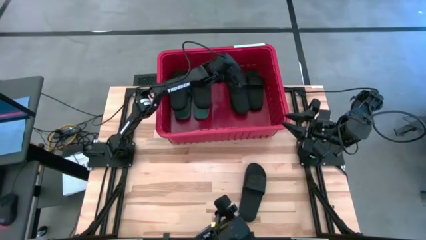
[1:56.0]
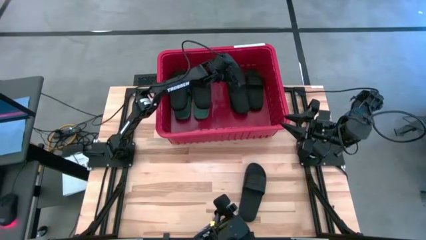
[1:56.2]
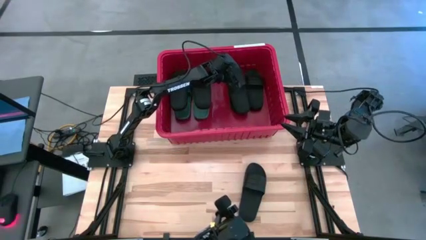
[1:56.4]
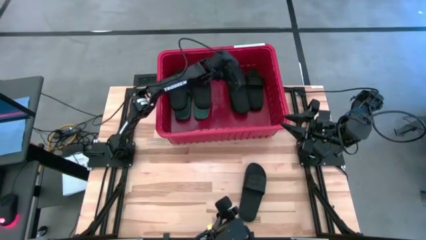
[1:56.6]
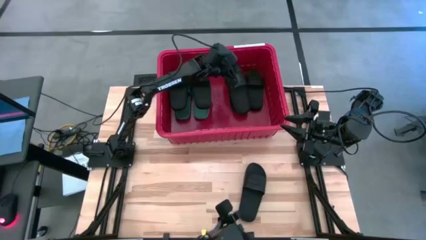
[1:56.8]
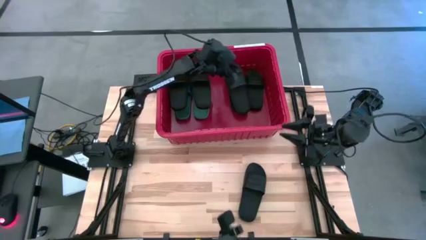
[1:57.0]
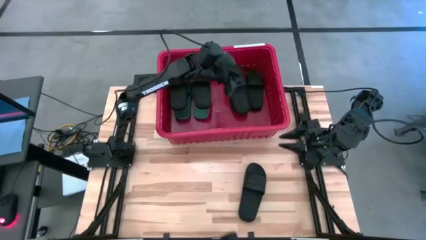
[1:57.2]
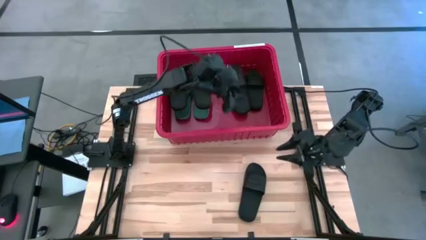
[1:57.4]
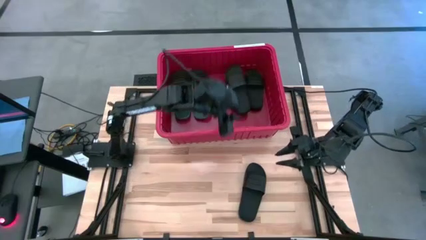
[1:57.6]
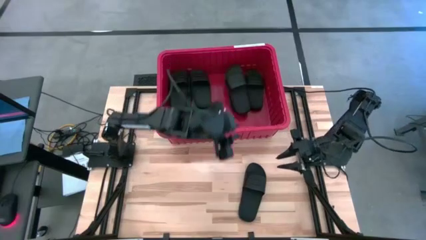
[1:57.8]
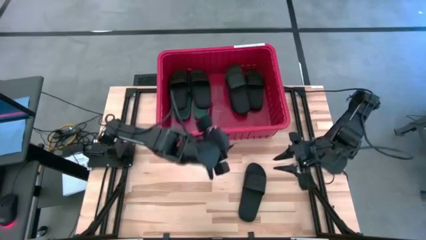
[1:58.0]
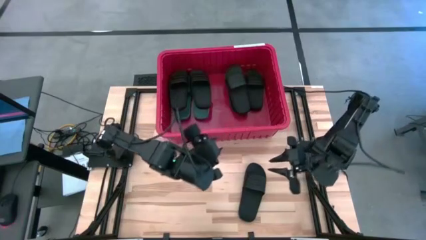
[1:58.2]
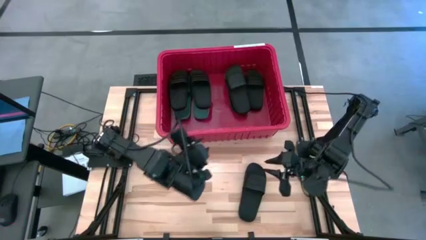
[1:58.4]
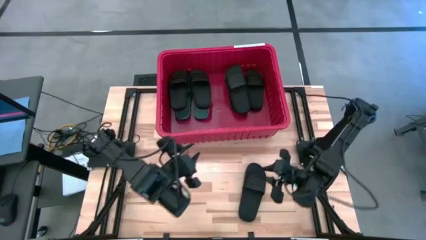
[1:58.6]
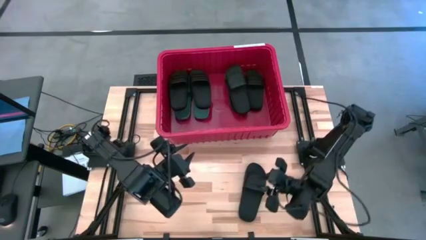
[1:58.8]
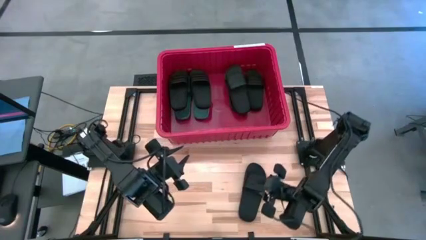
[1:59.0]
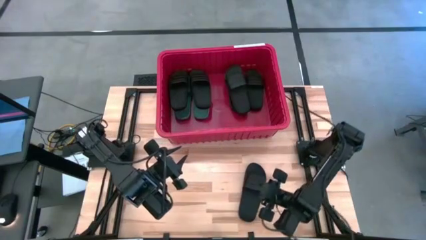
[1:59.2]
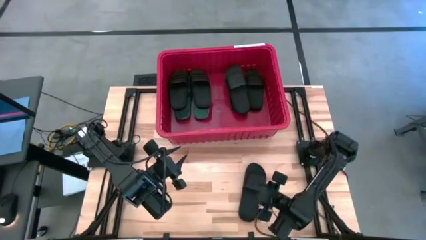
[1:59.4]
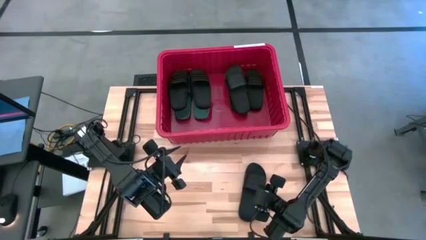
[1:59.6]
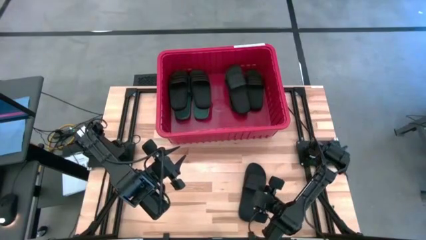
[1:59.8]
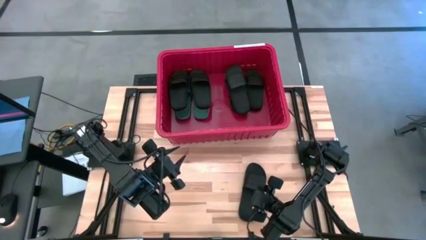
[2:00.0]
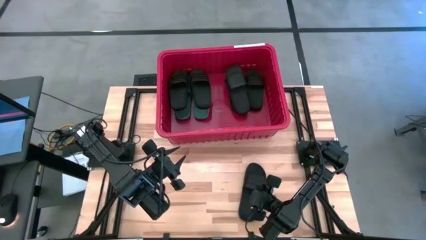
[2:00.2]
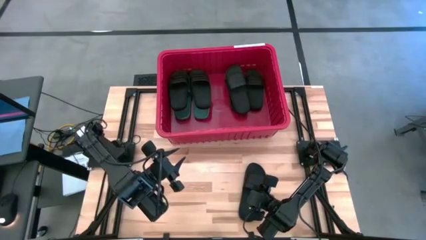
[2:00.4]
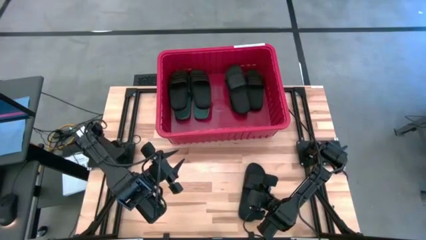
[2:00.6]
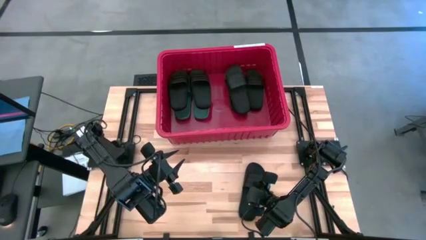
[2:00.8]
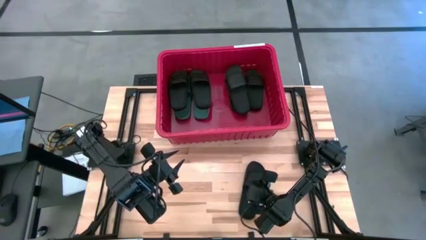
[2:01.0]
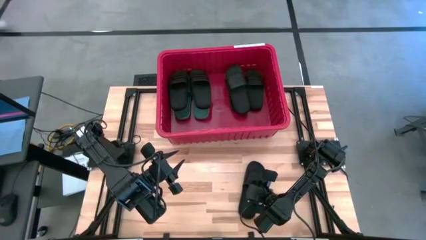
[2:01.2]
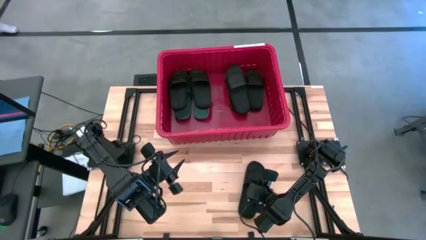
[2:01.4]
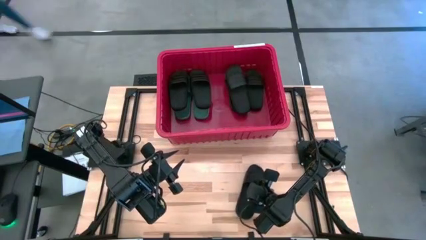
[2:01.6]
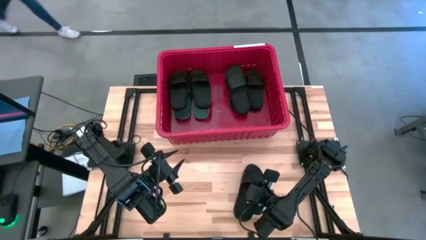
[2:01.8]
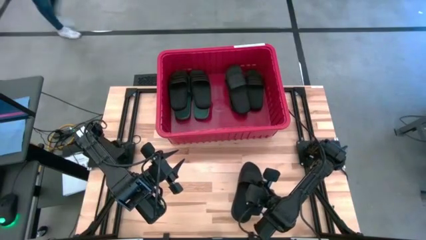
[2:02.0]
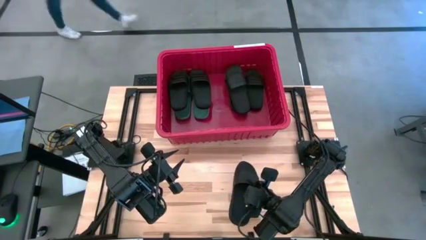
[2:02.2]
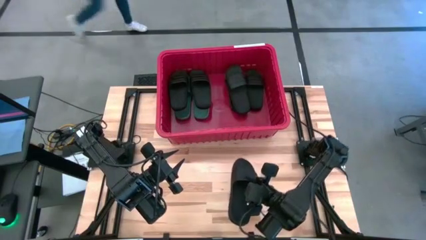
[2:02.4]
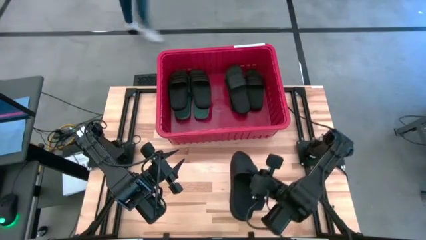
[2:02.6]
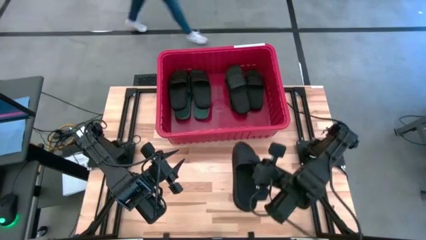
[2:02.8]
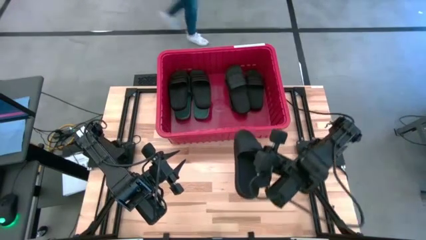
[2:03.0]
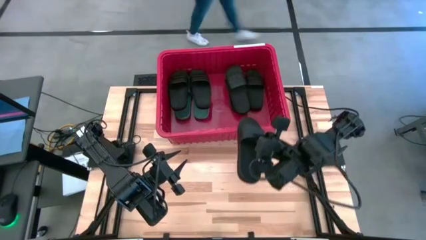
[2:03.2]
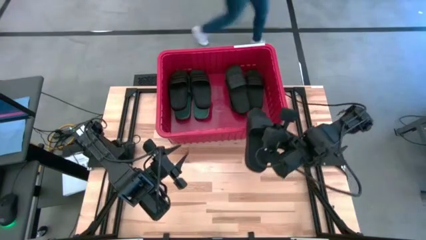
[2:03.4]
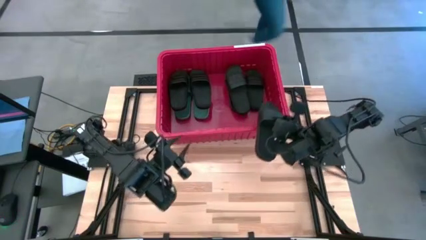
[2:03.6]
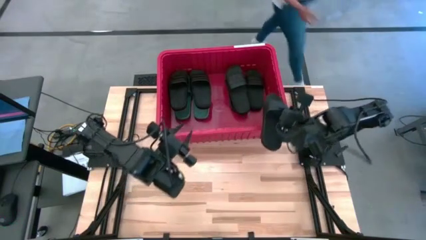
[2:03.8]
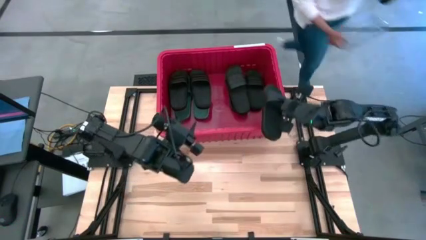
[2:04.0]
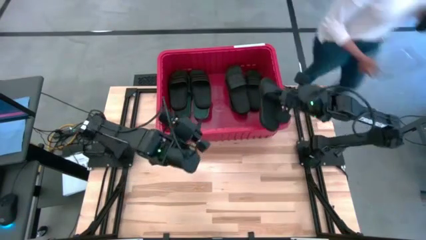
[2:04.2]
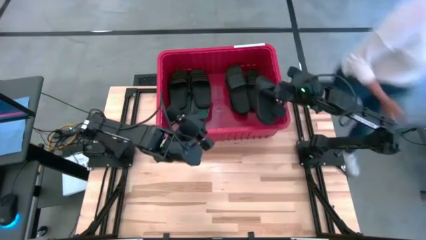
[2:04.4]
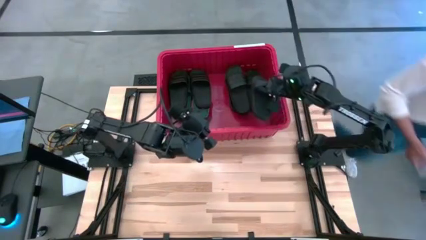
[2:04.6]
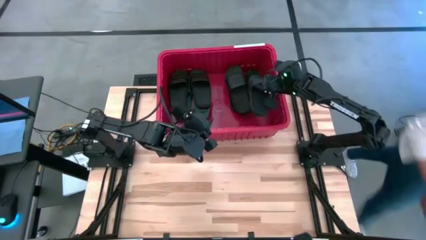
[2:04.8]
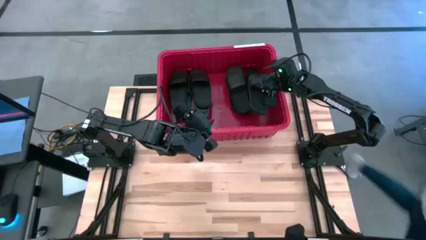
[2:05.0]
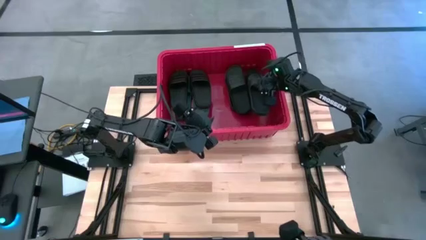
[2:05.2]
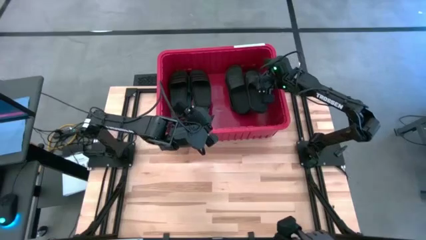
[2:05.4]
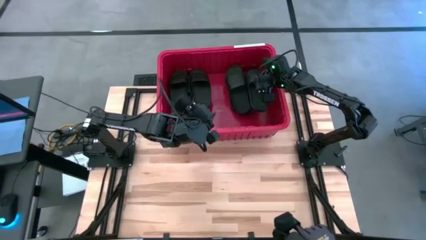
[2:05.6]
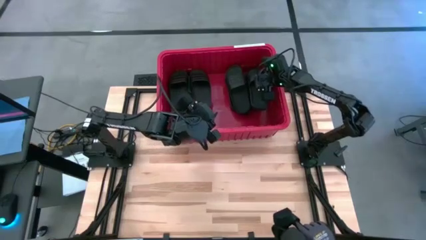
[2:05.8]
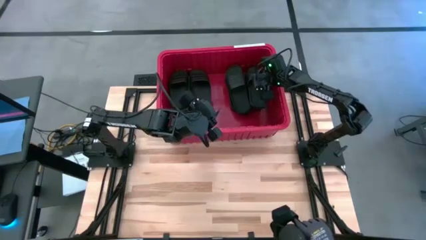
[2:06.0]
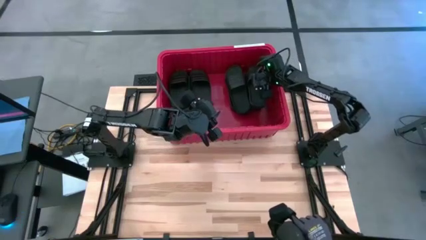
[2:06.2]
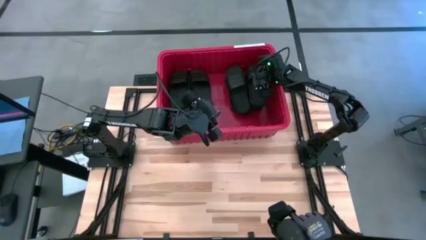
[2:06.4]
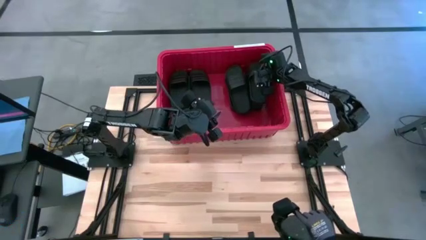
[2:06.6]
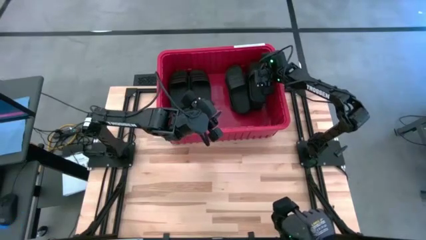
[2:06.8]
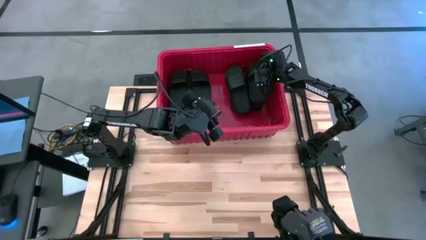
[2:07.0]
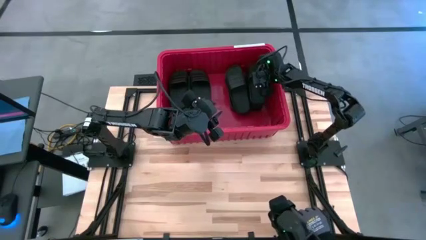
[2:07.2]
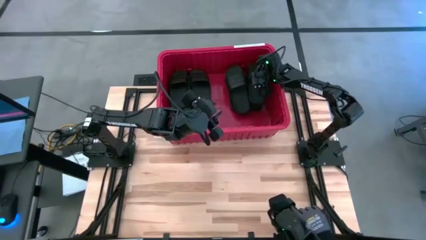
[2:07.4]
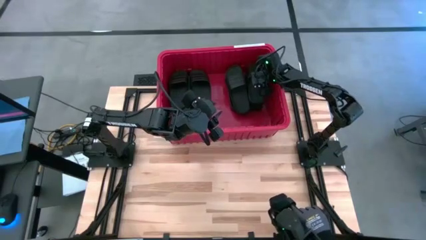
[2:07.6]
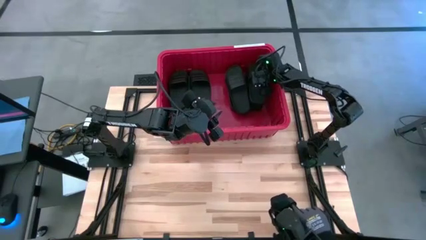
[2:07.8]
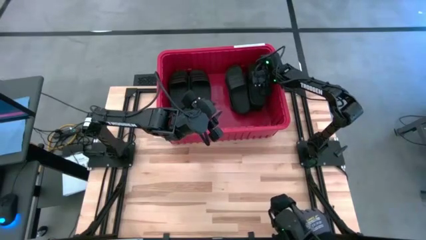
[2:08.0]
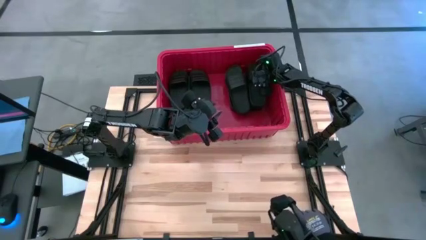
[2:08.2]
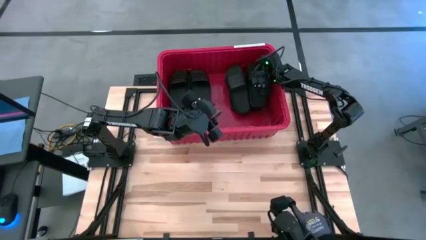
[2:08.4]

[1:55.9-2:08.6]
Task: Pick and place slides into bin
Put the black slide into the red bin

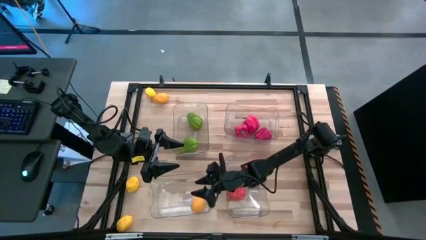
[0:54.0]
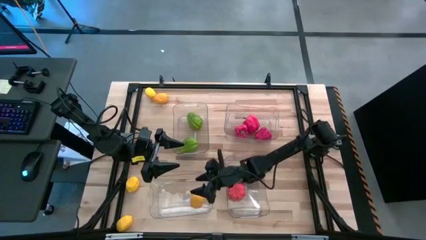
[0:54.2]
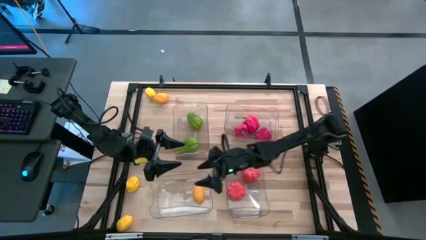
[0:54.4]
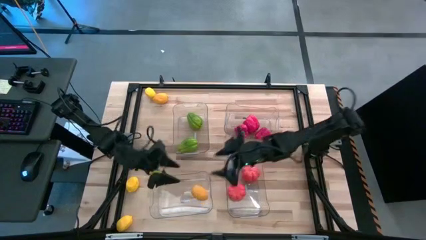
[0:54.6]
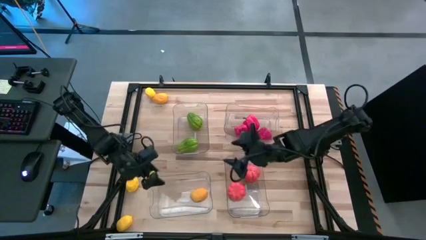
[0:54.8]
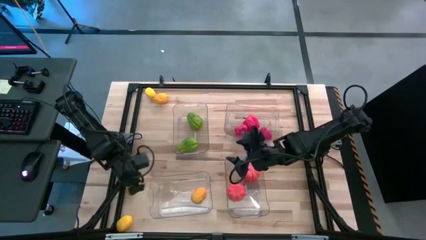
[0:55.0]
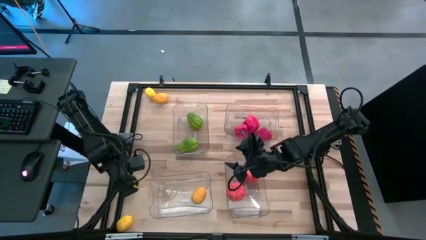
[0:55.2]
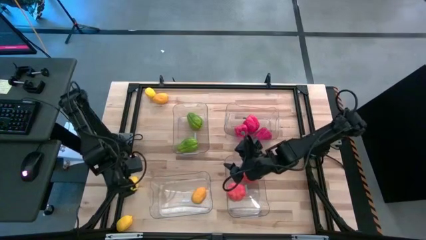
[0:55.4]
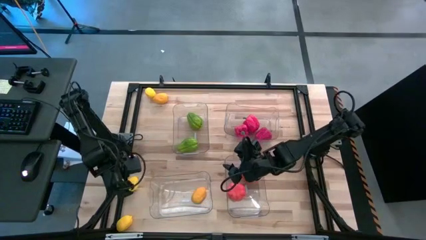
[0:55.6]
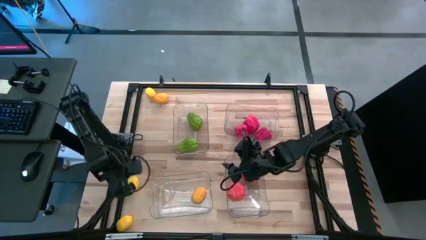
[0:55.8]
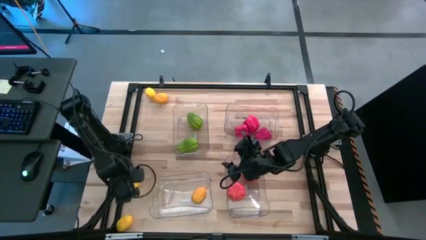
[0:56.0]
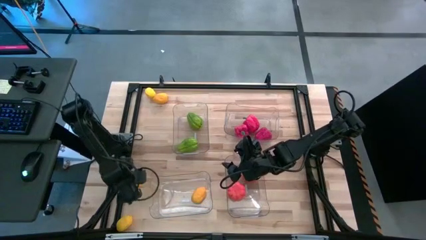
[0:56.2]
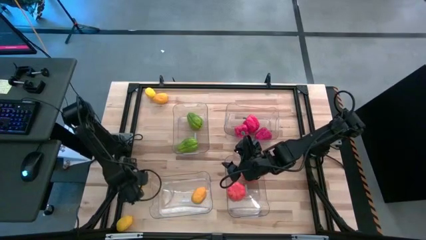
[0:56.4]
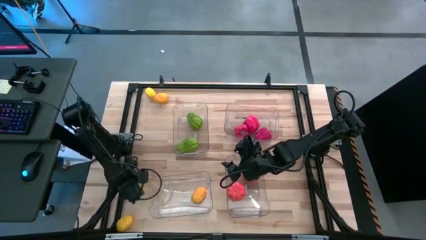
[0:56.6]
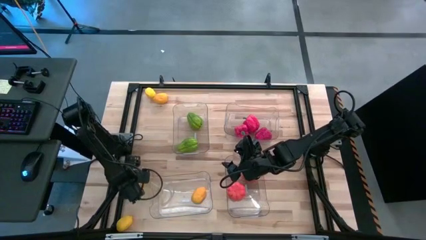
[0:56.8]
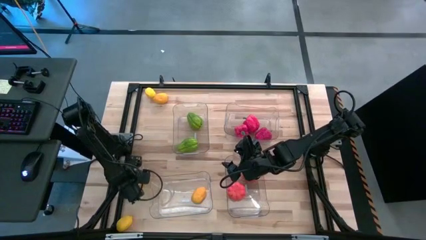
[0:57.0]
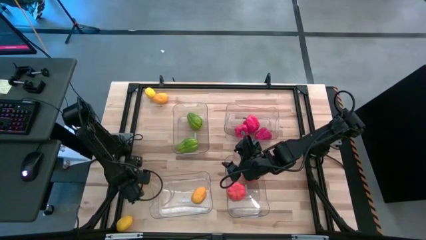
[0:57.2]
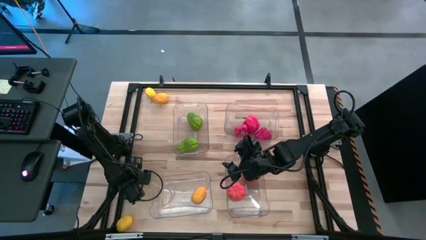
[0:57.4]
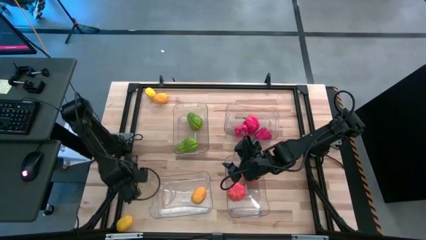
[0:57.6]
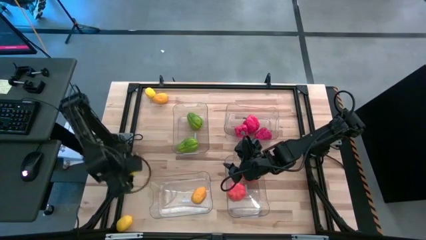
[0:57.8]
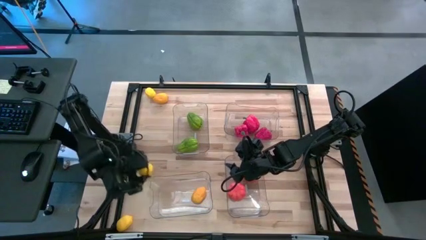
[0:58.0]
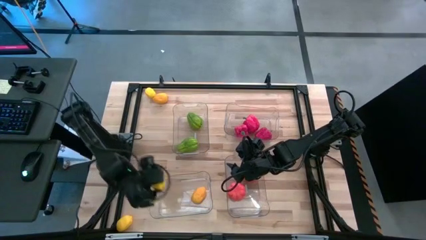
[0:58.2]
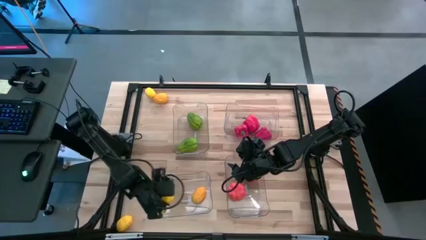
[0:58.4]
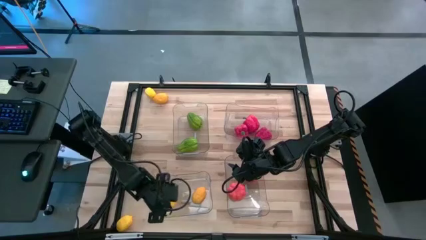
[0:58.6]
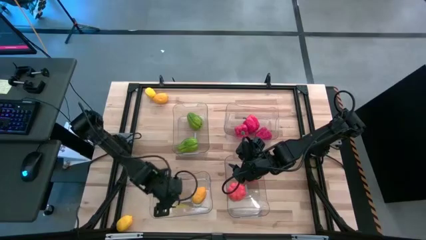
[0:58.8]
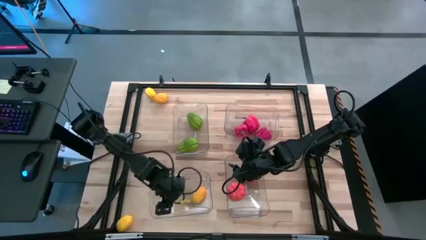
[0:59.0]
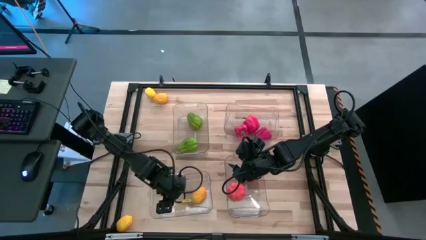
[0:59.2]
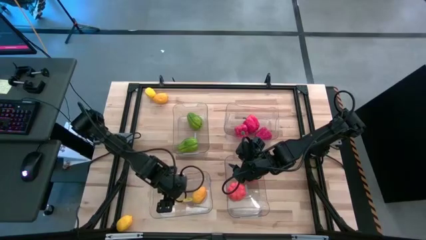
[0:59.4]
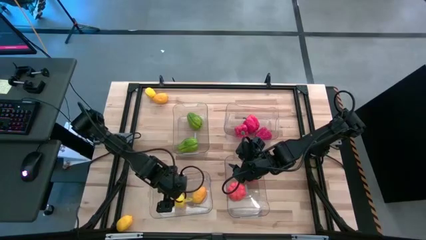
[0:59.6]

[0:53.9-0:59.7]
Task: Sort produce into baskets
Put the bottom left yellow lemon into the bottom left transparent bin
